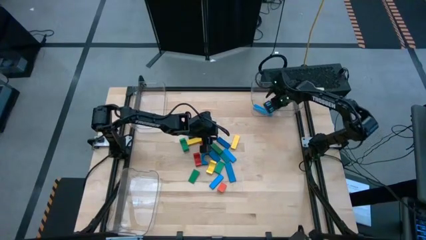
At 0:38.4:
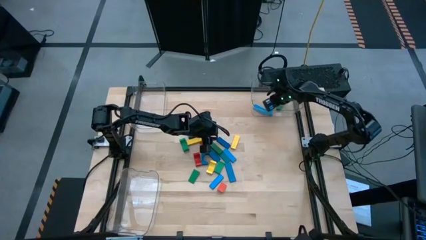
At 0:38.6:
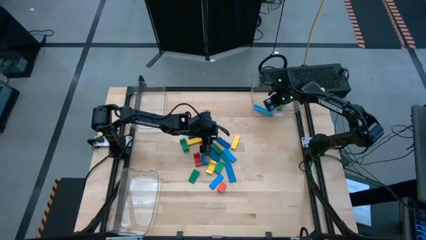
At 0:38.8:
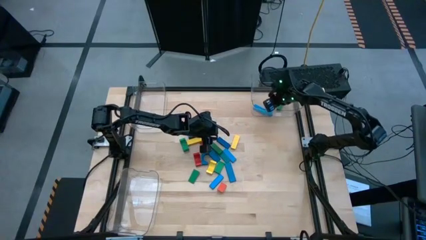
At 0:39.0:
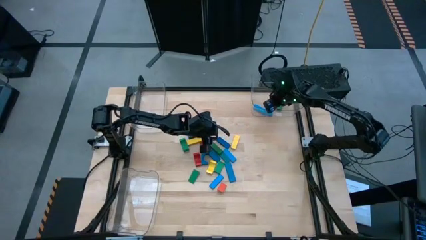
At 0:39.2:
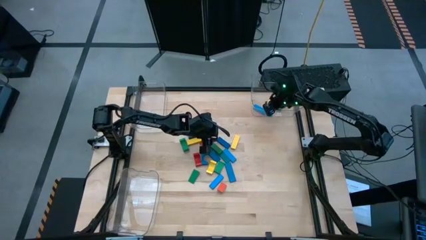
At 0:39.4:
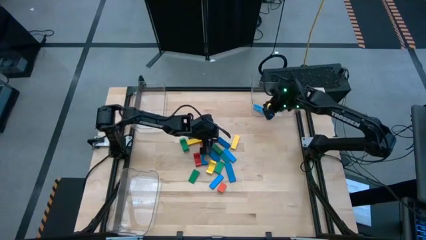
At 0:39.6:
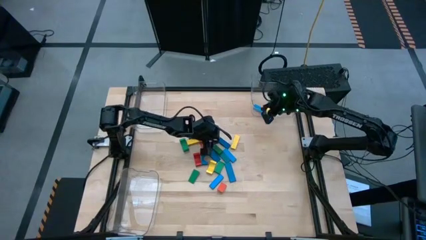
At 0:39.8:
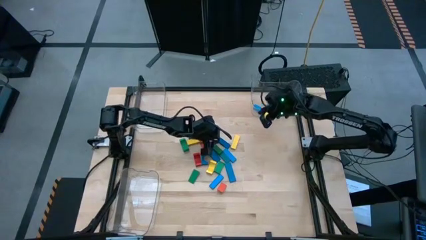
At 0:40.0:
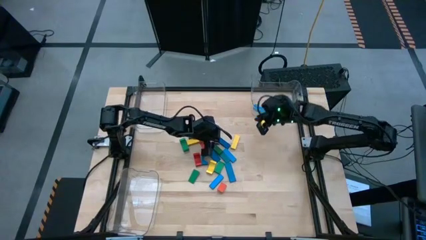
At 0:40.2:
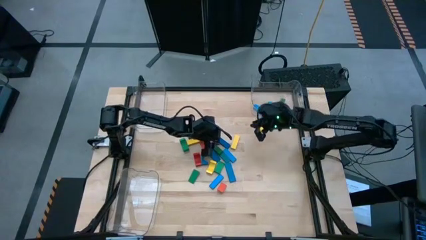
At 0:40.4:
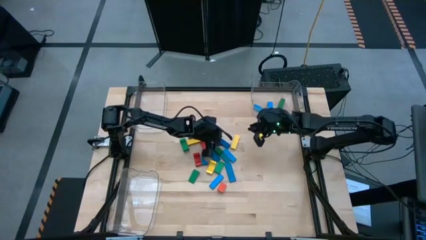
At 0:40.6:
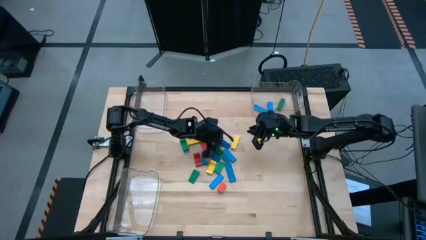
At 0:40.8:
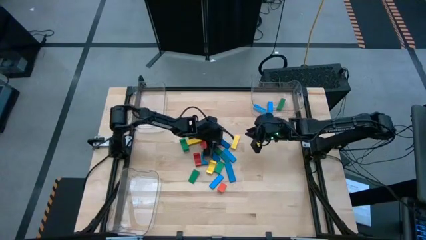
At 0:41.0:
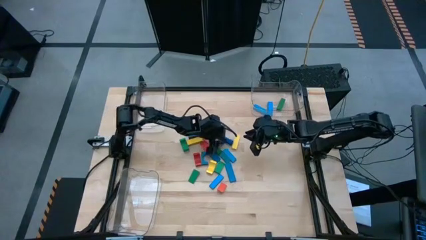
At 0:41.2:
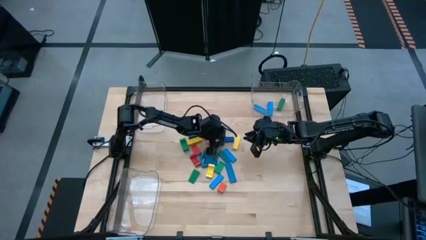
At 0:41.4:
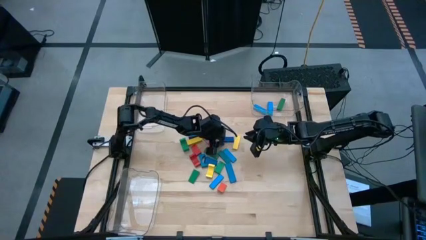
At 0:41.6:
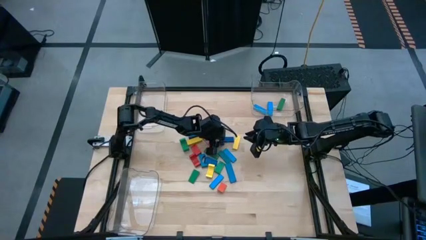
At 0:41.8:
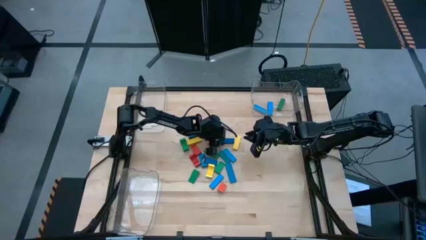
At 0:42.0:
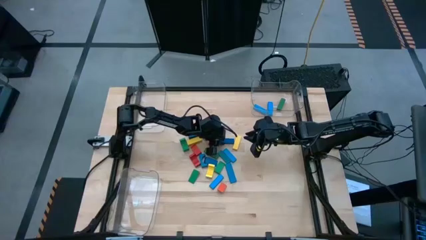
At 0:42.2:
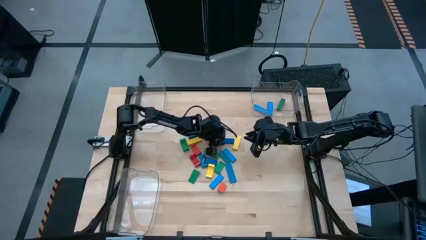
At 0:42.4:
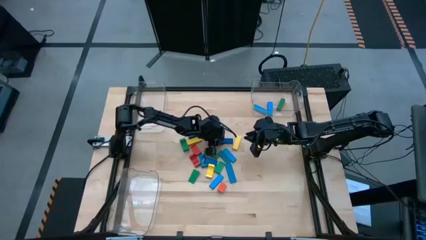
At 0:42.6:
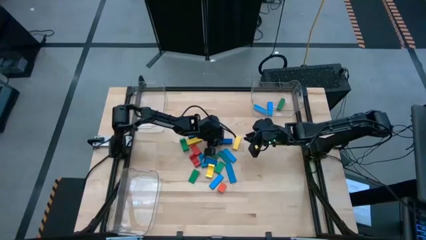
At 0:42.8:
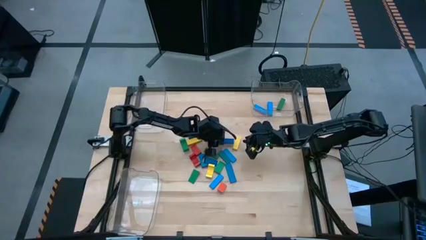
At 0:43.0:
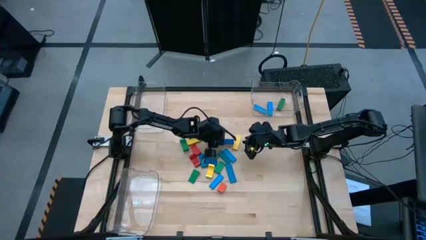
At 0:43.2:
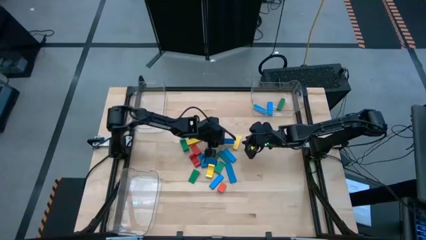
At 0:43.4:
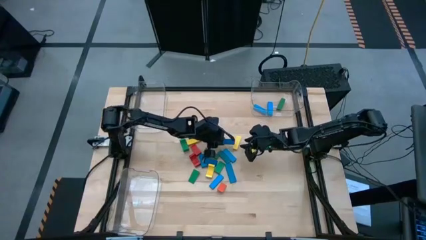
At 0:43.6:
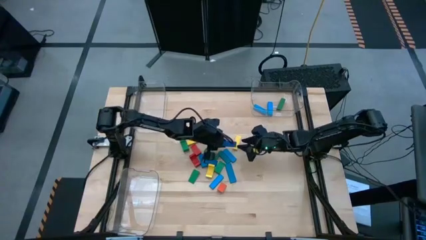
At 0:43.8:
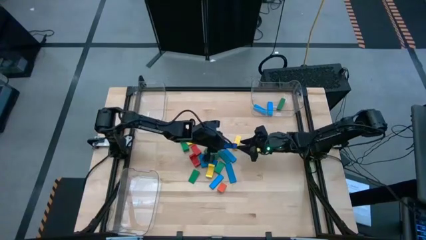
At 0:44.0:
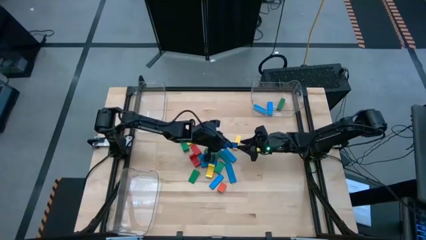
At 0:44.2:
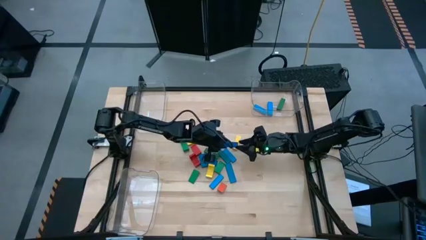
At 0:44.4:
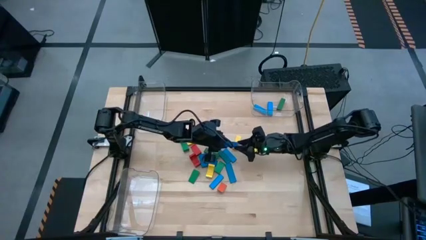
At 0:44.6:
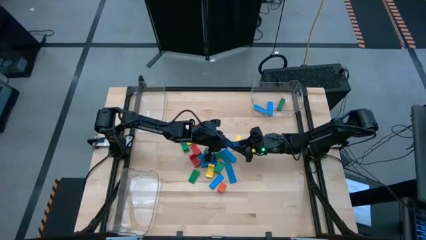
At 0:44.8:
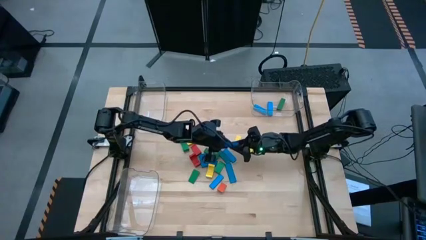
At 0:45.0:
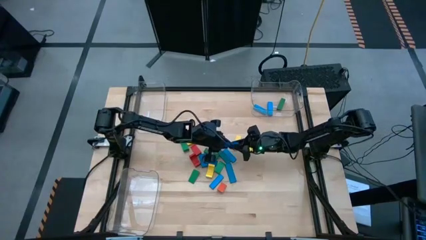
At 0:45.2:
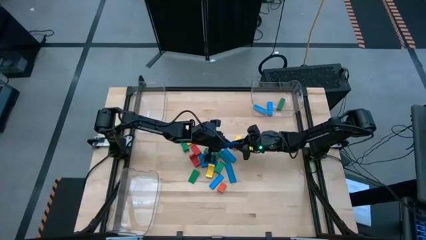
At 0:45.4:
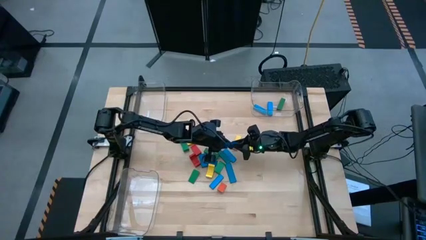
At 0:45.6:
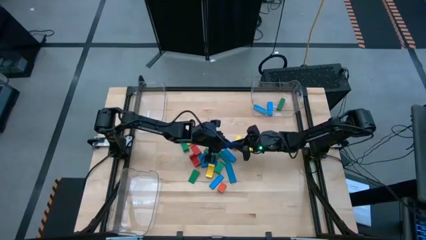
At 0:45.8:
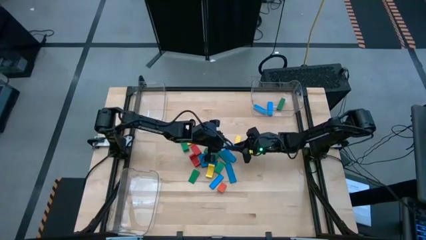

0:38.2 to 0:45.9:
Task: Sort blocks by size
Put the blue rectangular block into the top right transparent bin

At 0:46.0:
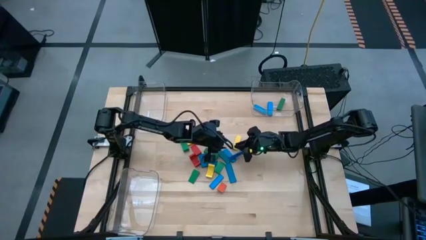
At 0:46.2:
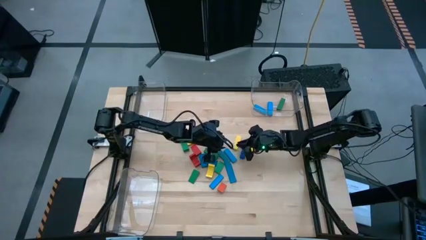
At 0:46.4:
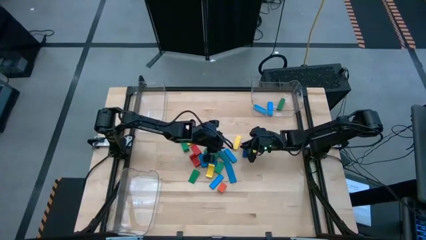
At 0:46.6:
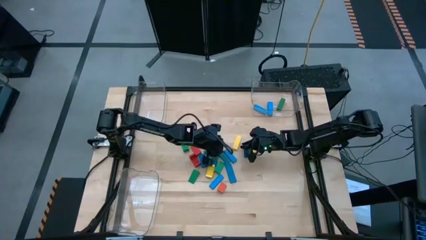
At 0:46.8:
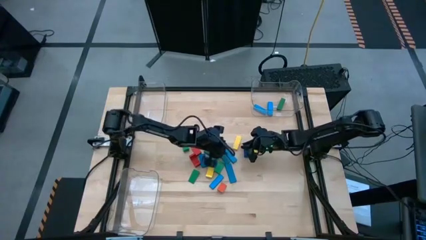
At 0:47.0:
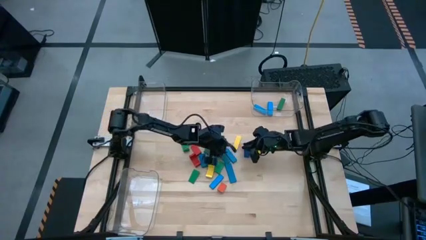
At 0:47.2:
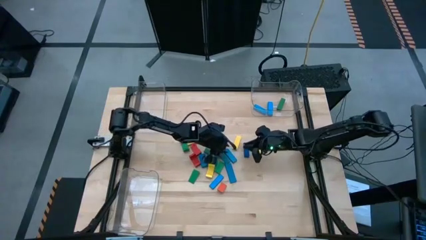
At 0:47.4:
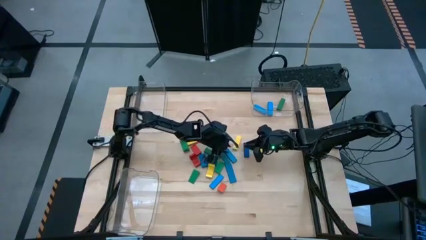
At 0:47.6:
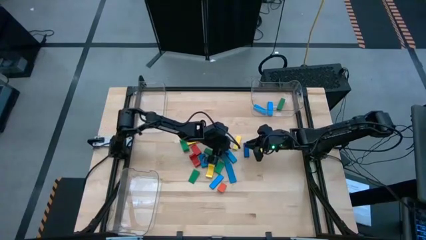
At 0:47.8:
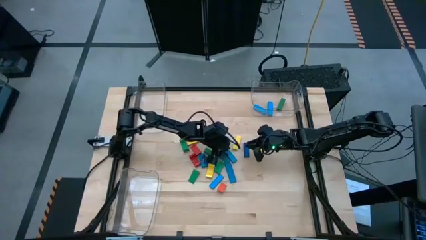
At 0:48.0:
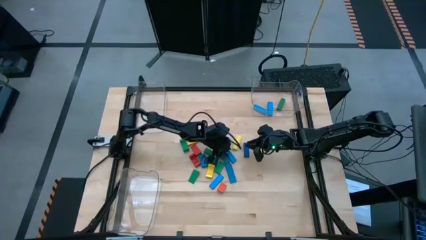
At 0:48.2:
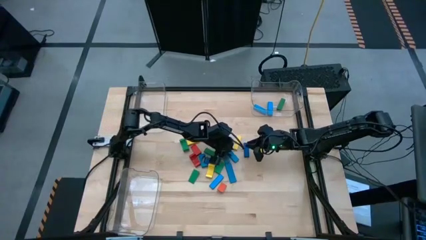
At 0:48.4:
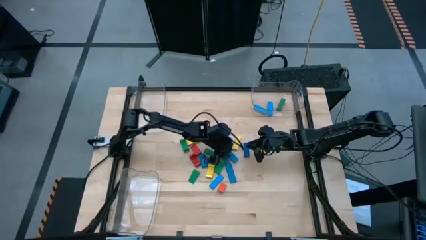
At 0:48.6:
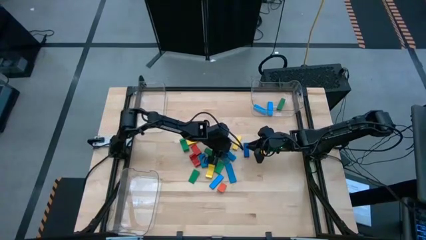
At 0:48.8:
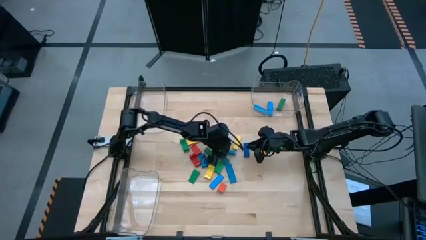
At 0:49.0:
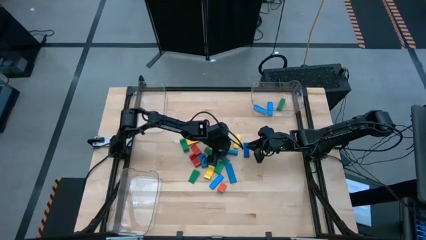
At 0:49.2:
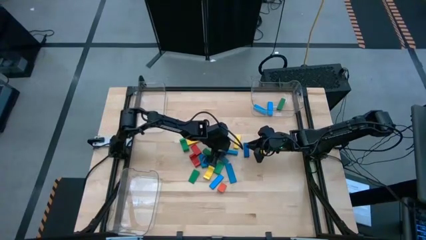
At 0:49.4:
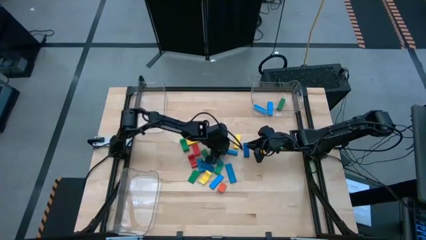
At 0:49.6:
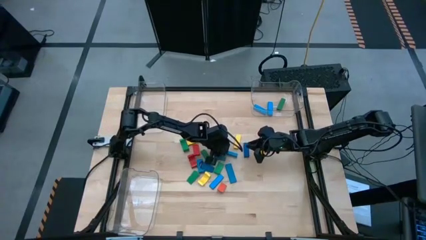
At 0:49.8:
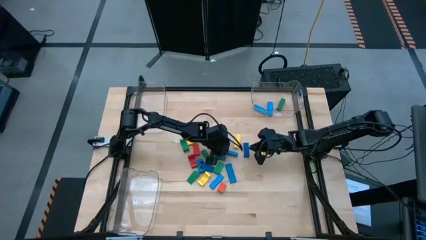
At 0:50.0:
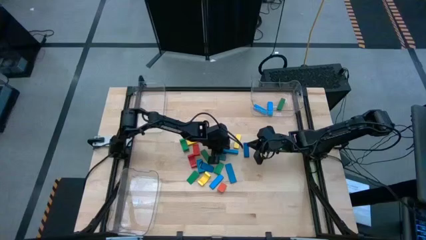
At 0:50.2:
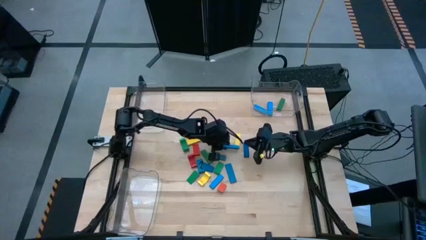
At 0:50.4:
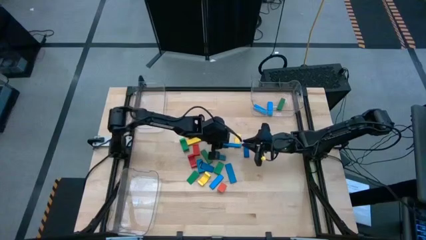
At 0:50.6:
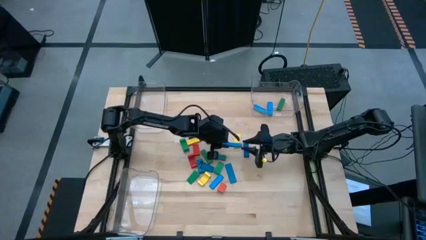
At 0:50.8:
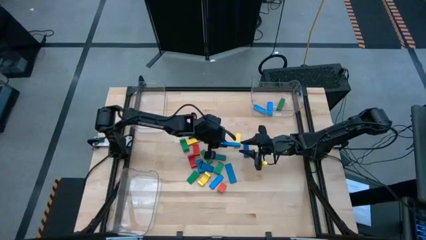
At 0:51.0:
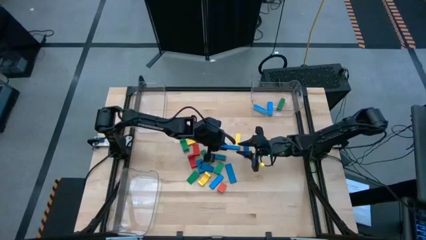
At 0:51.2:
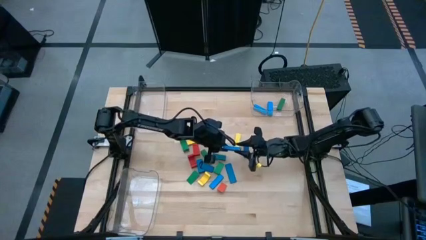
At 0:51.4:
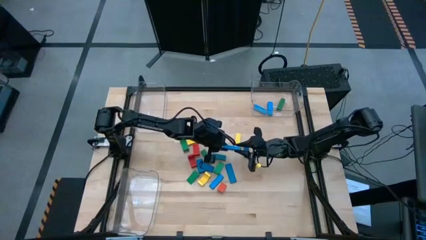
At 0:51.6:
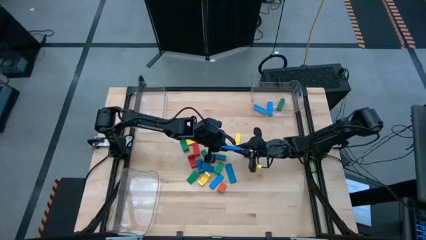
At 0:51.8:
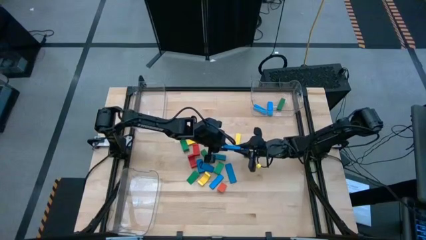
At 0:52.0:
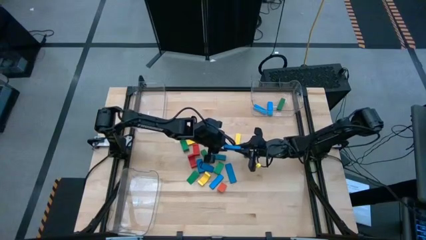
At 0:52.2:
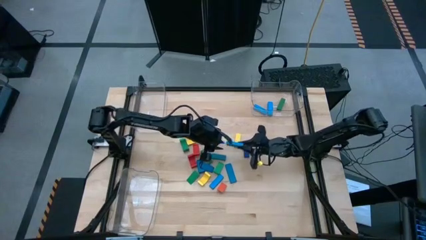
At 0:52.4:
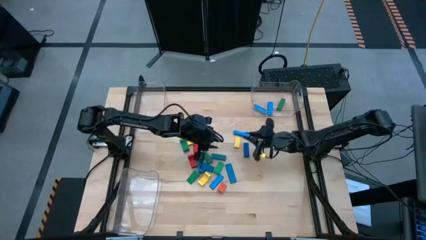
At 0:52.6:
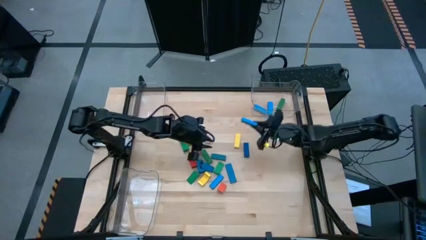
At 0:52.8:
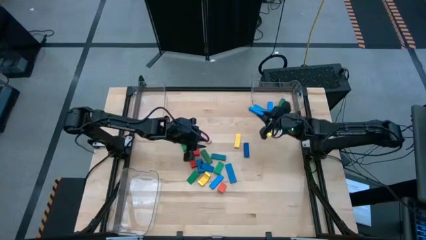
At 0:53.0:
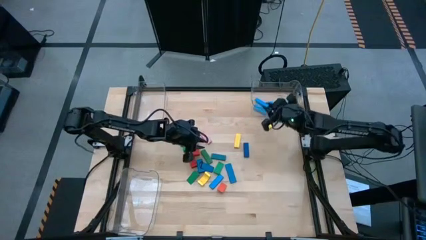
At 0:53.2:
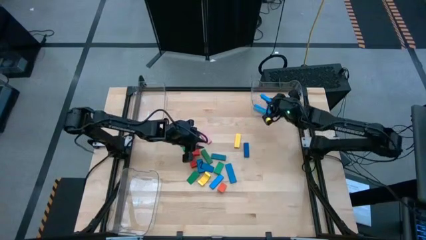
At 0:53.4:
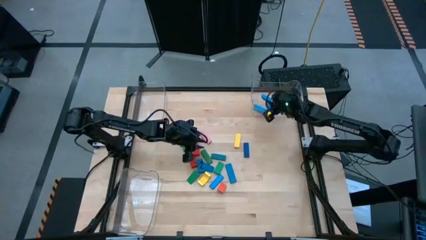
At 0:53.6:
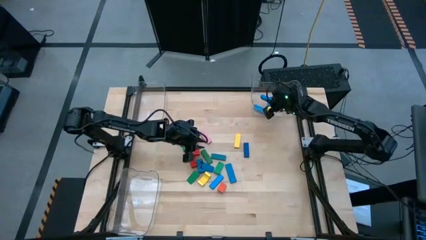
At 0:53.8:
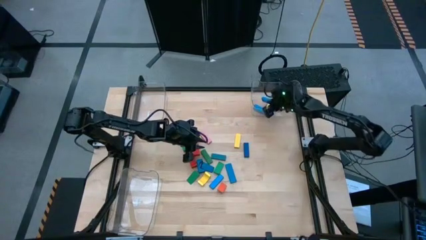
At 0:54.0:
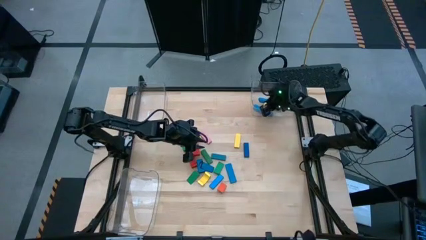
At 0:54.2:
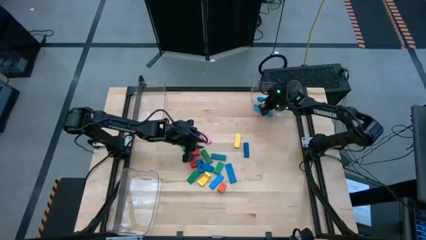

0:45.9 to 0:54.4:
Put the blue rectangular block into the top right transparent bin
